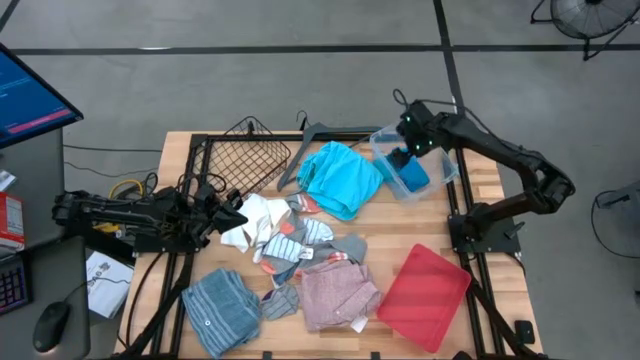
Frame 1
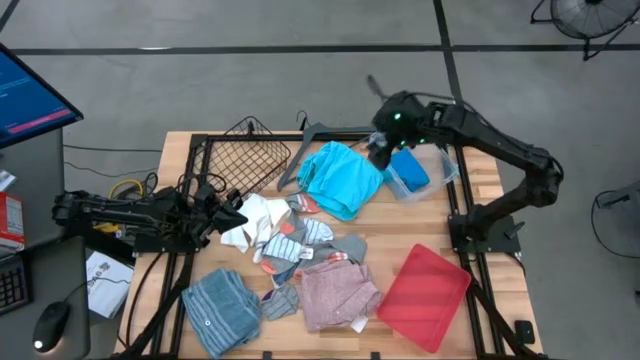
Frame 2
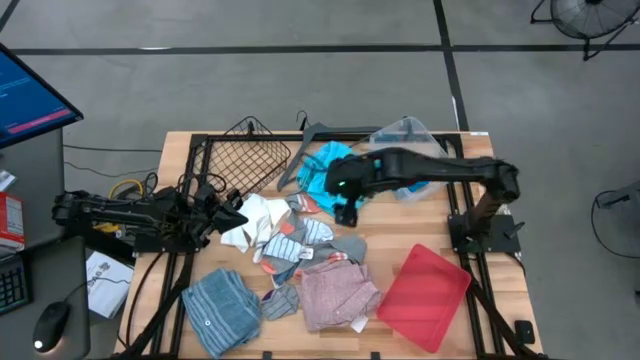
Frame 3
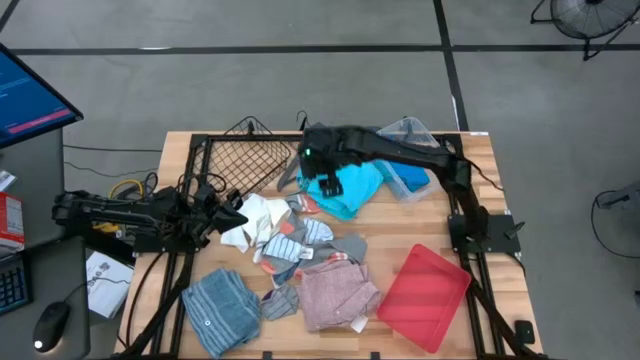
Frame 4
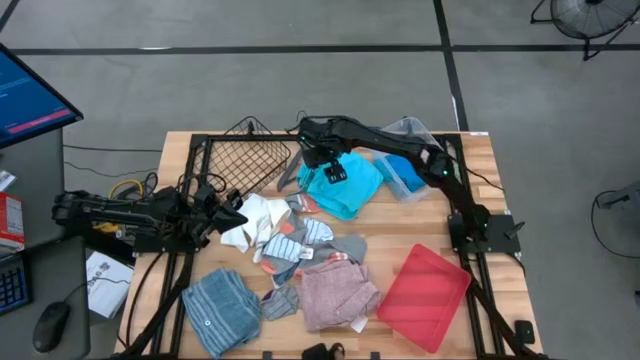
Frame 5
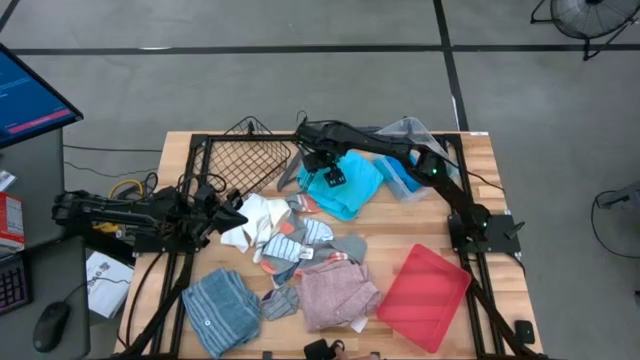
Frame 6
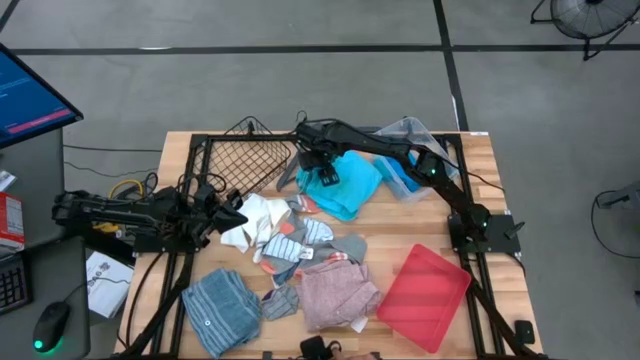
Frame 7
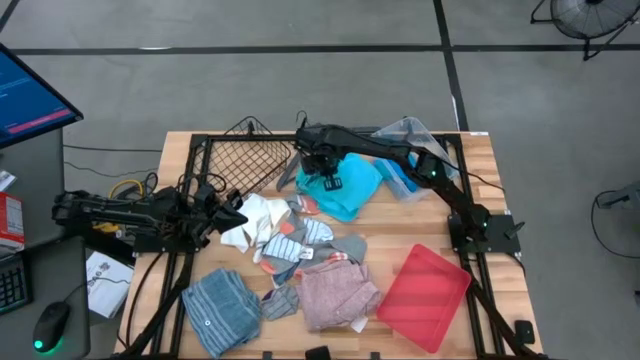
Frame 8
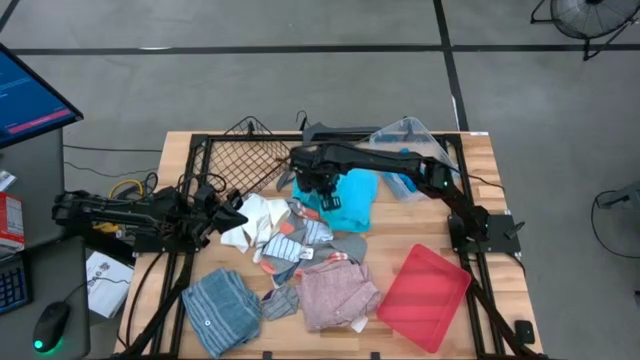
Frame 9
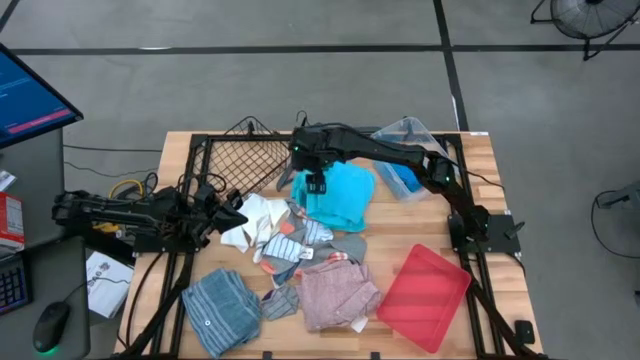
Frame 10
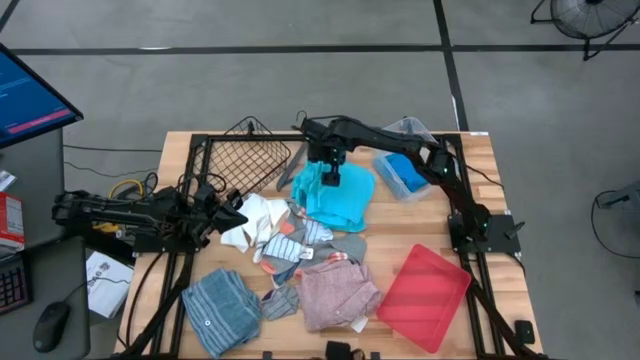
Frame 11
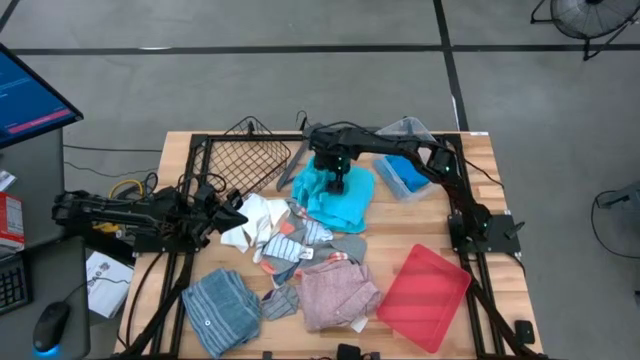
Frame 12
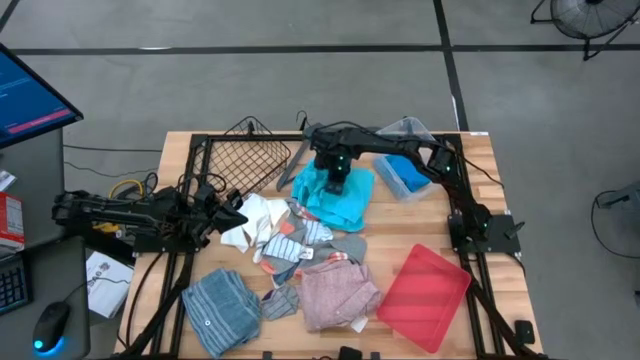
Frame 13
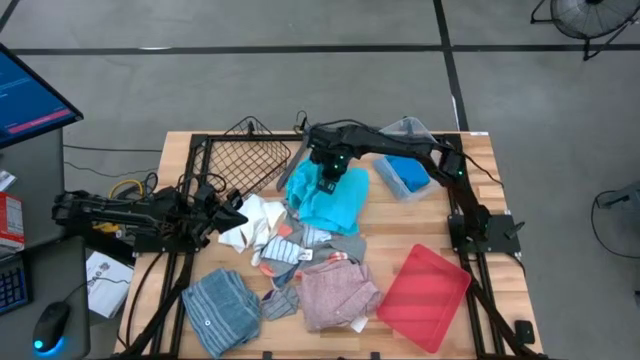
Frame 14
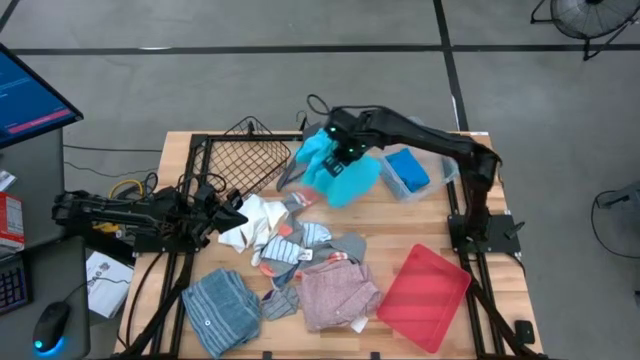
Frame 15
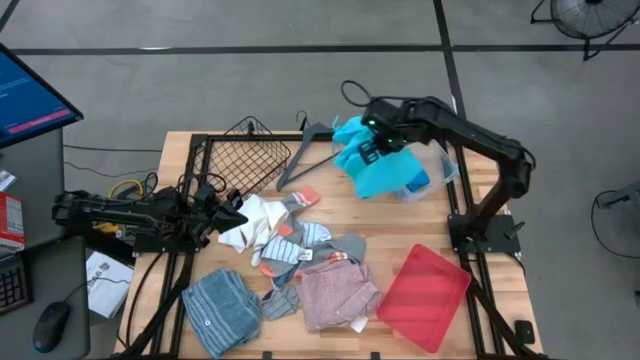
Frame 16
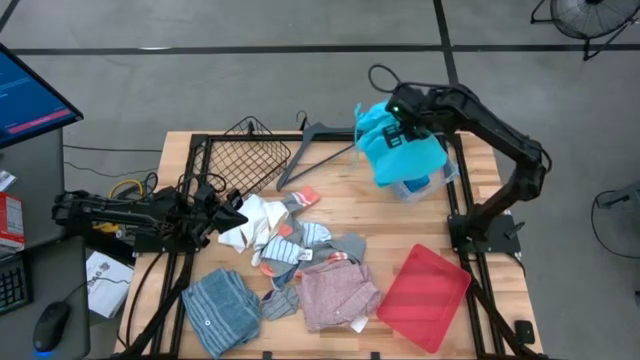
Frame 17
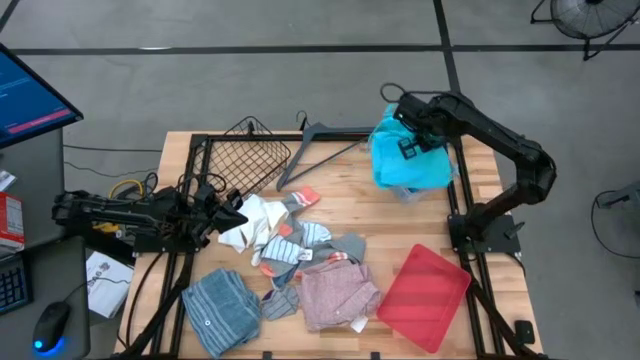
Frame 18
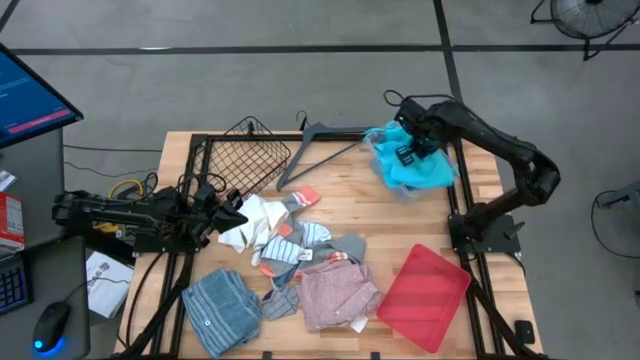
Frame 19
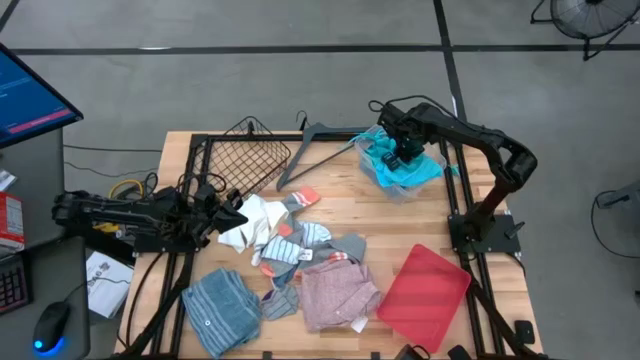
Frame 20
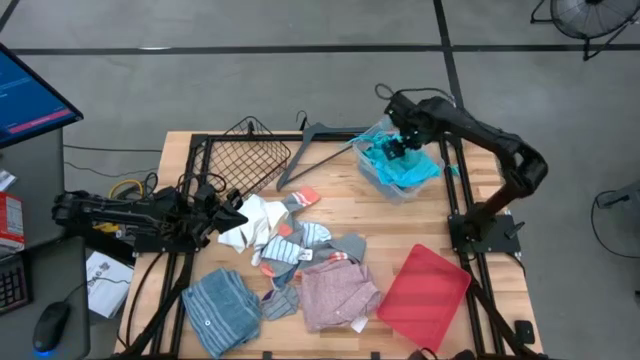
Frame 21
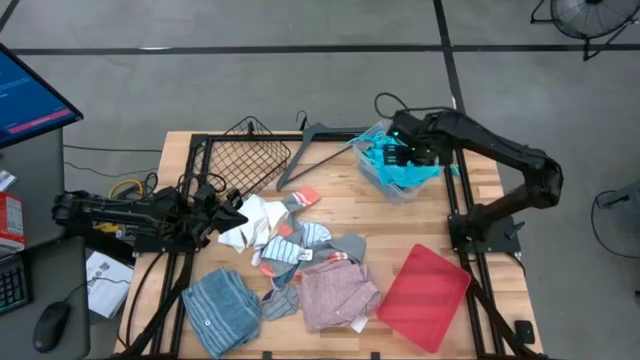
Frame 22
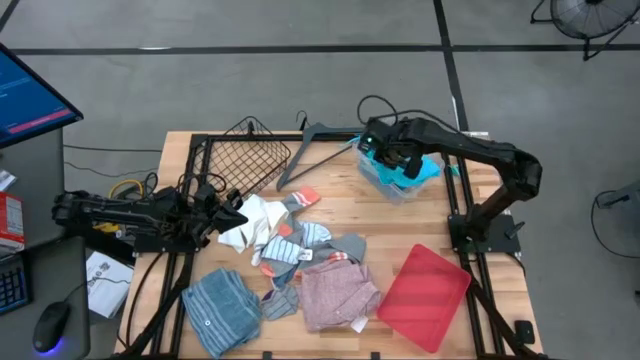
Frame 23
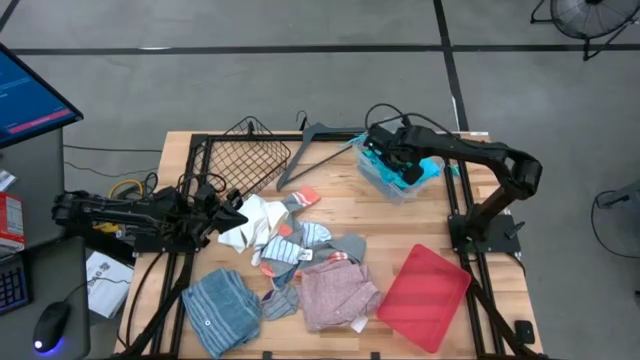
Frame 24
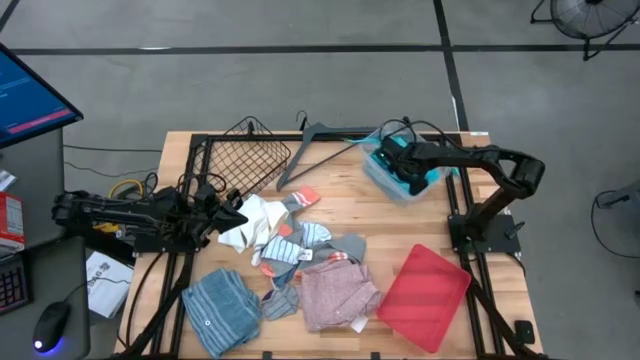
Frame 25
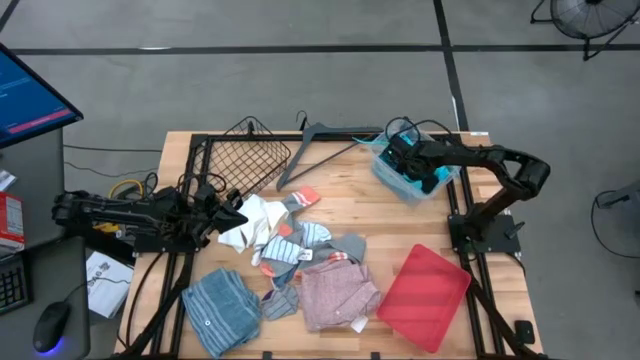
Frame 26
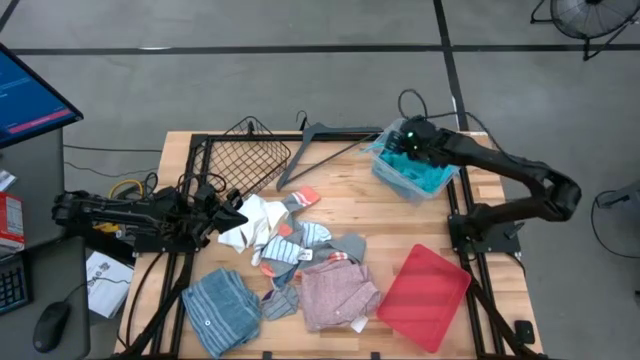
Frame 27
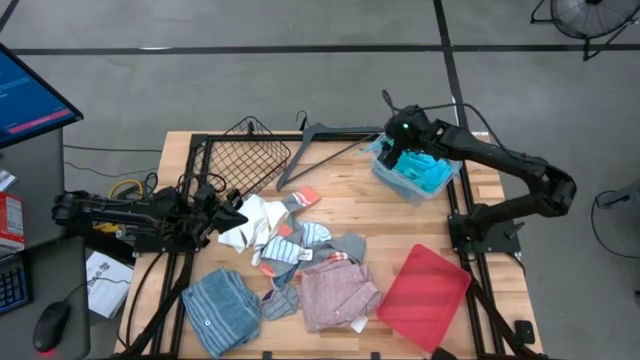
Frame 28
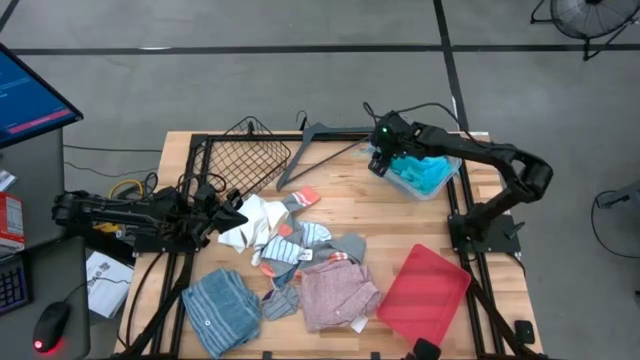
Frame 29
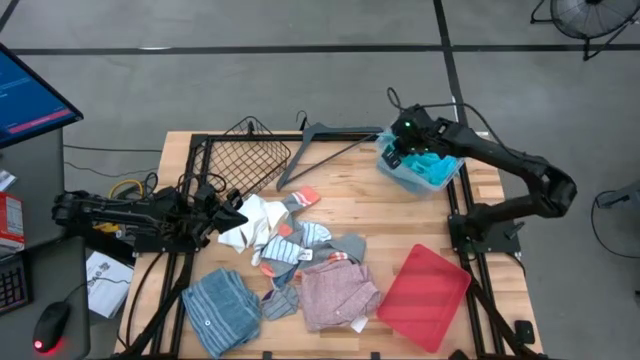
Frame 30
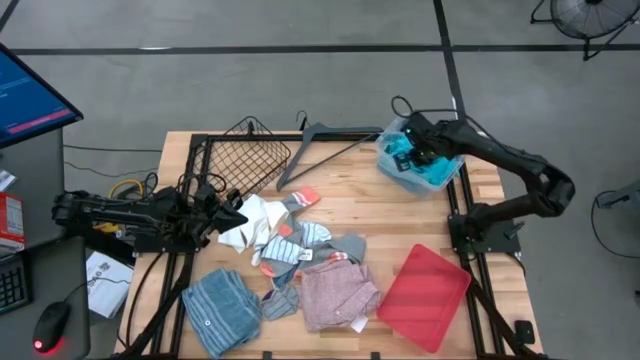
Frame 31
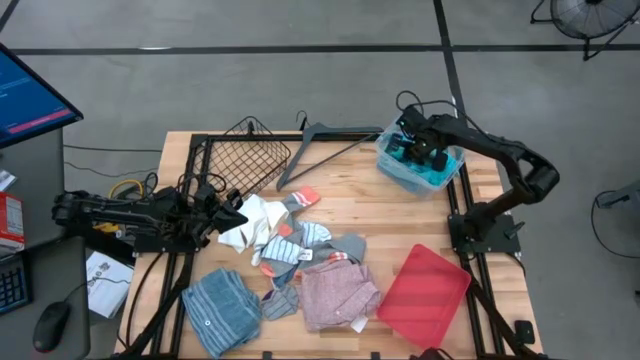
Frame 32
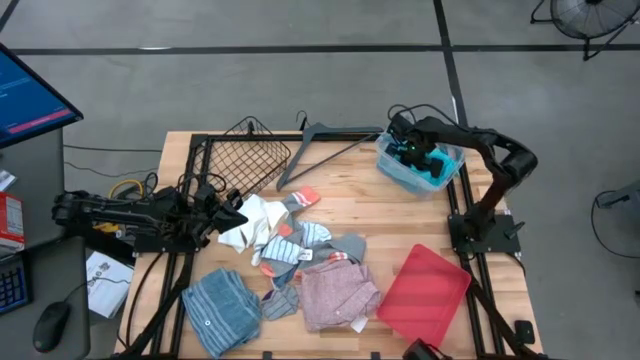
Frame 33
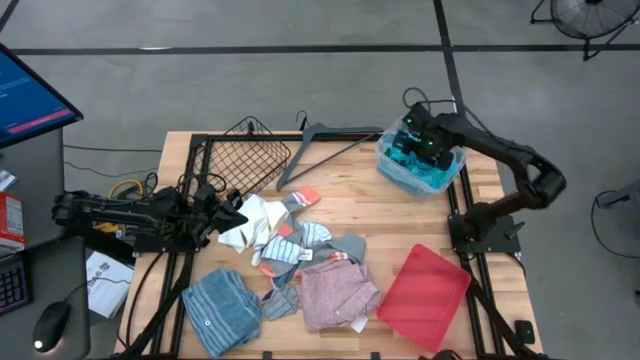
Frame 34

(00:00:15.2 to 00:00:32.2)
Task: Pick & Place Cloths
Put the light blue shorts into the transparent bin
